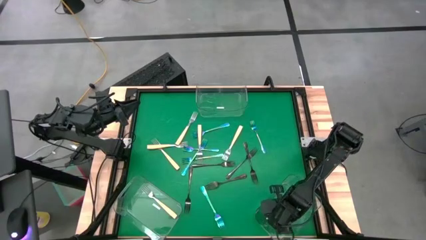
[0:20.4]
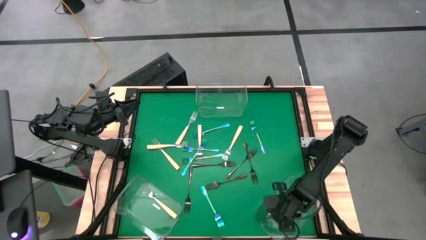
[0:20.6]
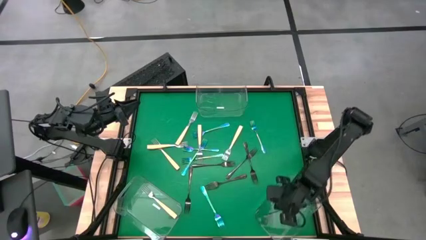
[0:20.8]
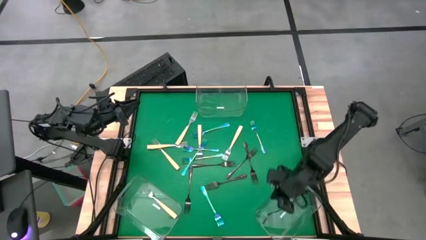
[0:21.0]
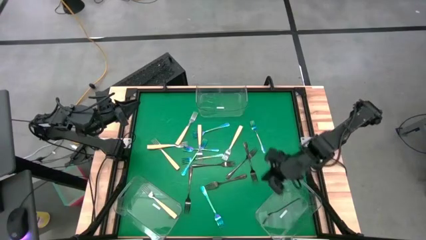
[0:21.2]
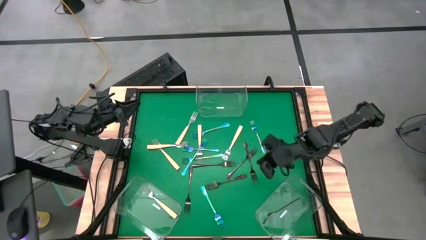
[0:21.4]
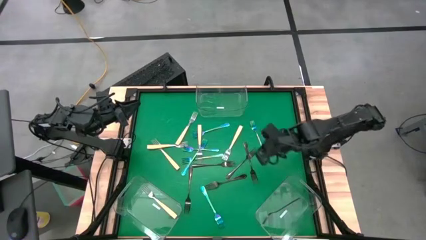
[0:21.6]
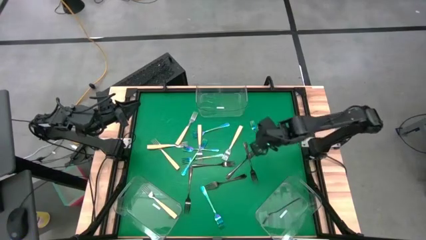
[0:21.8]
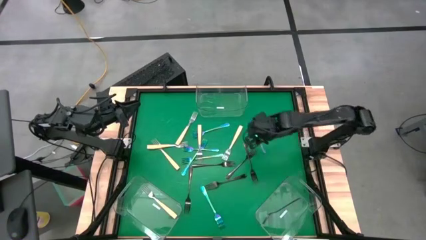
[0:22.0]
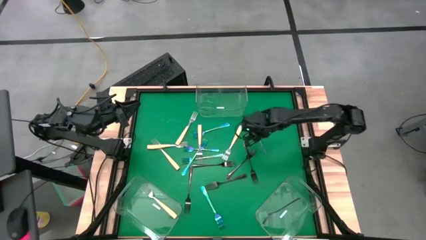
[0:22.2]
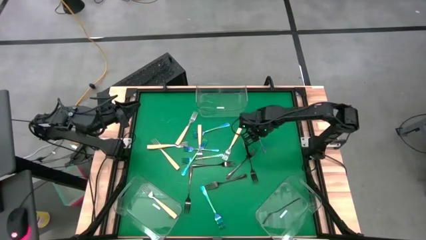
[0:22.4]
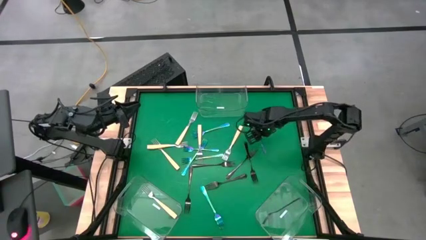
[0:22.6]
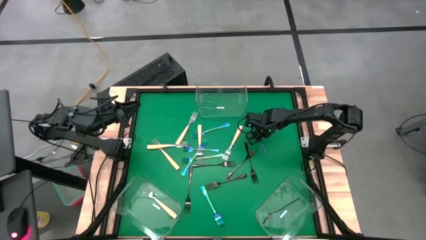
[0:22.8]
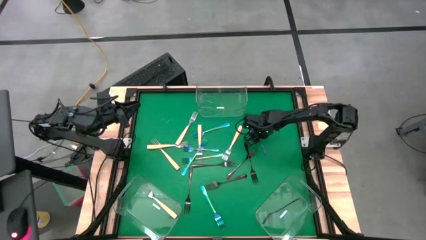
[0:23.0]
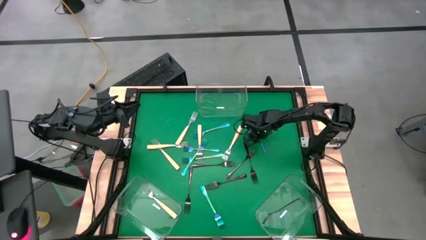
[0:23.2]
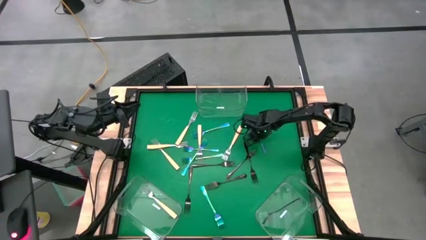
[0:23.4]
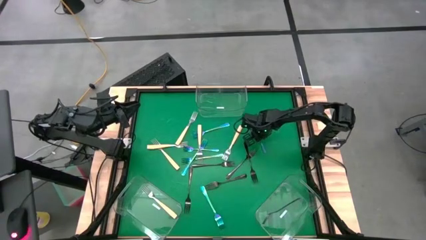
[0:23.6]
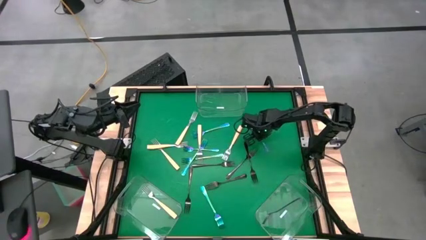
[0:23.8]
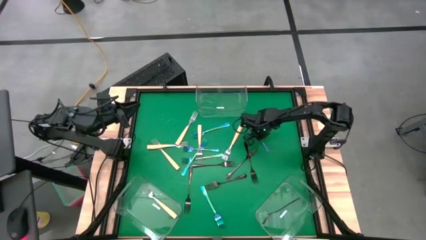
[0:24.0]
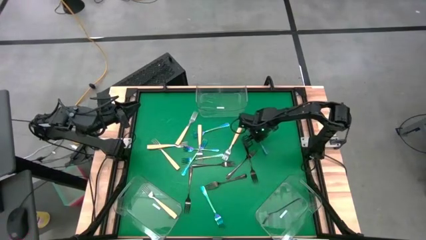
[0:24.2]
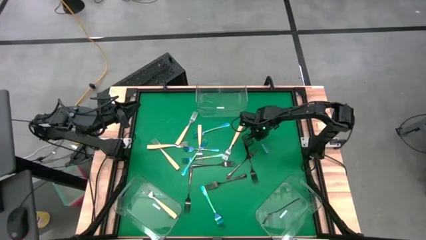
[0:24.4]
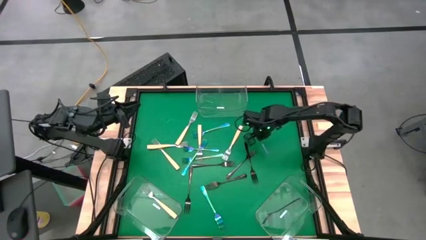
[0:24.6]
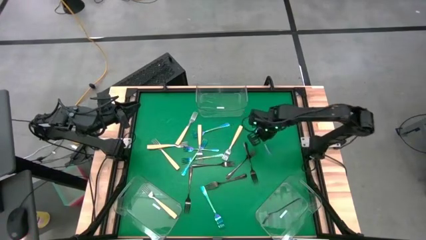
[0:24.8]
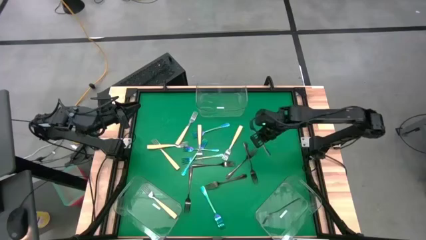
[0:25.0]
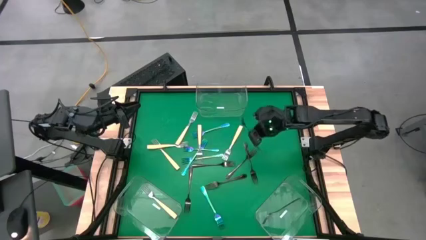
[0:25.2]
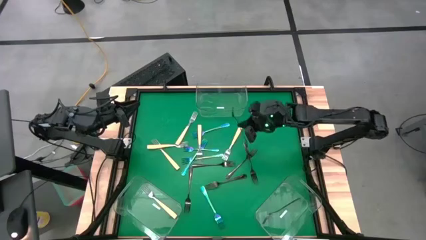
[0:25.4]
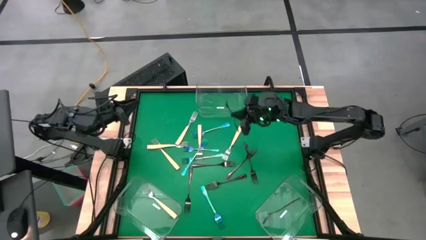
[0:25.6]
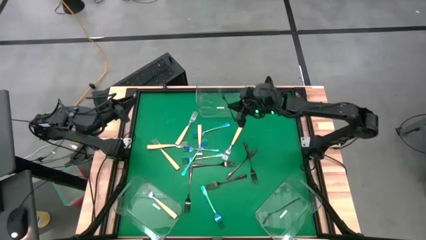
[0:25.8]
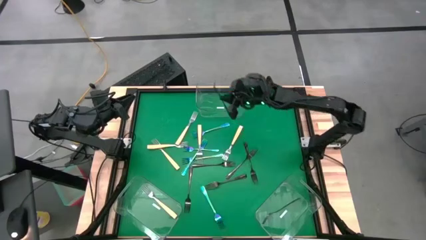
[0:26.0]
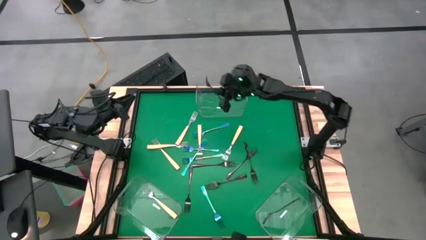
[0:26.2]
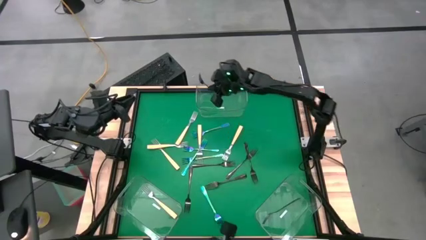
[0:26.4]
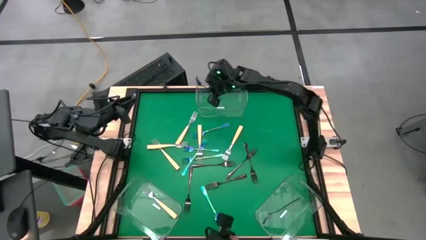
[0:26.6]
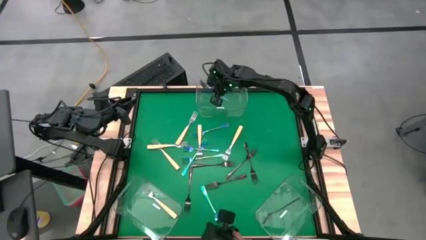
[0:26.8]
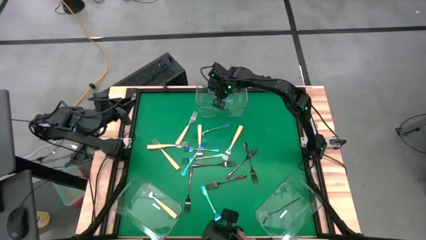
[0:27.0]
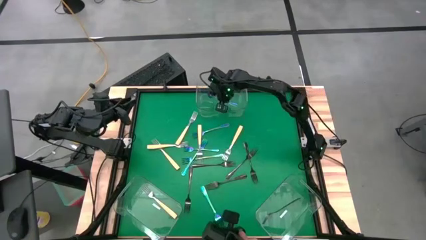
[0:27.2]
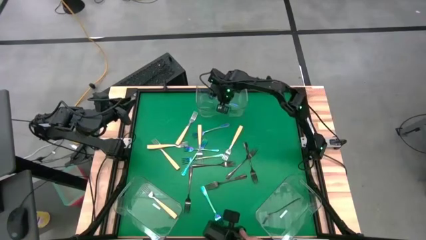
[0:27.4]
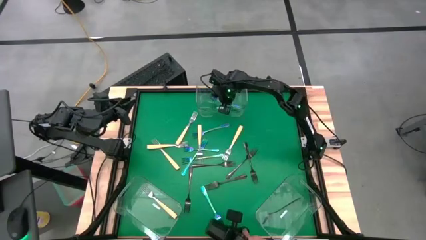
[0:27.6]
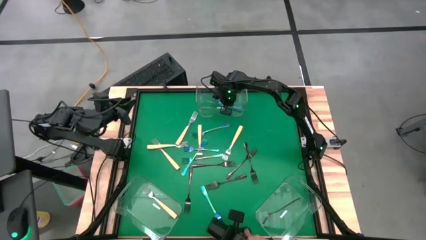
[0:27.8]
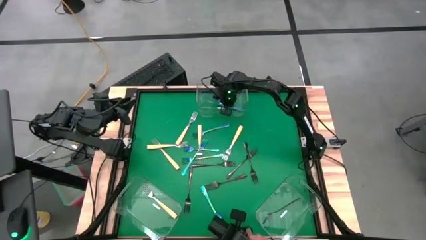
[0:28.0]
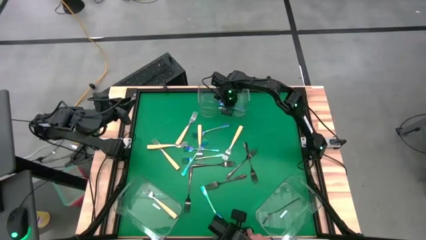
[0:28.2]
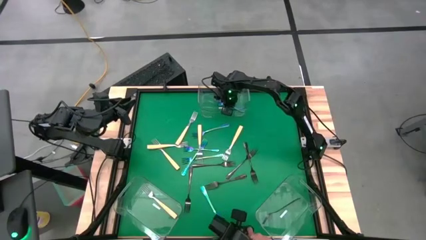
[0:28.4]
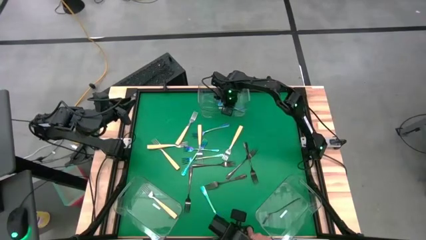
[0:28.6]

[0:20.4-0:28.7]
Task: Sort silverware by color (type)
Put the blue fork into the top transparent bin

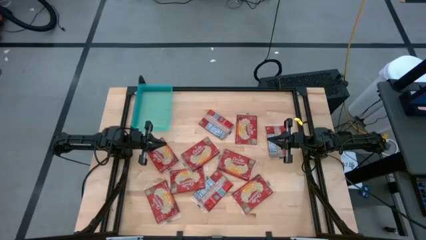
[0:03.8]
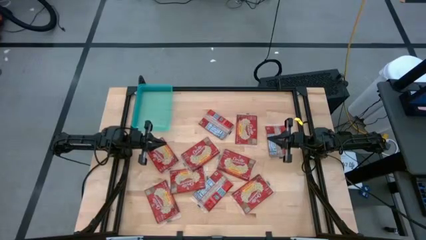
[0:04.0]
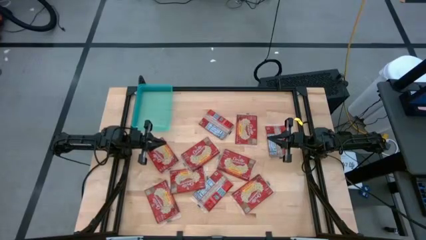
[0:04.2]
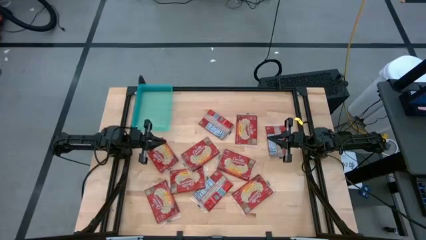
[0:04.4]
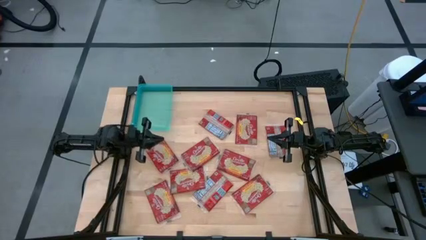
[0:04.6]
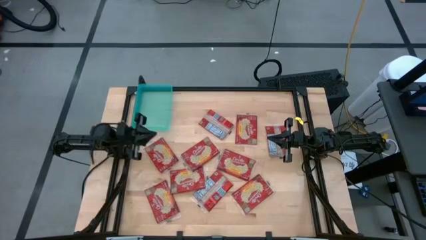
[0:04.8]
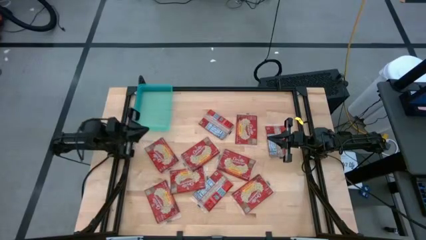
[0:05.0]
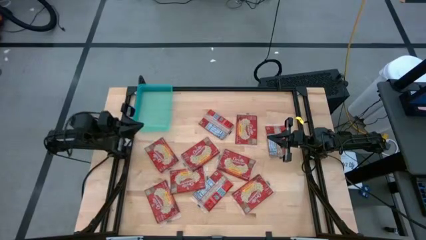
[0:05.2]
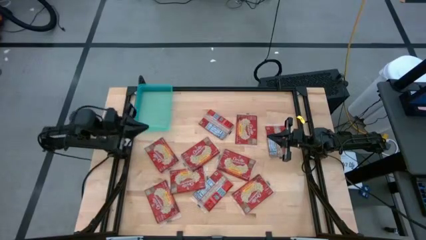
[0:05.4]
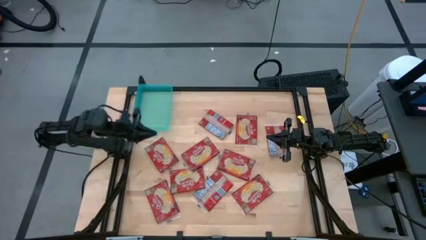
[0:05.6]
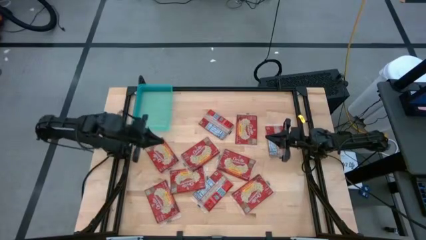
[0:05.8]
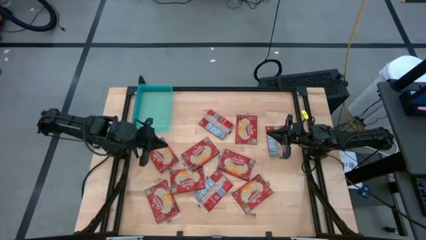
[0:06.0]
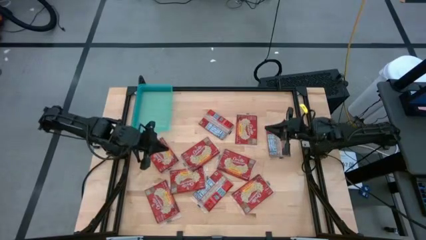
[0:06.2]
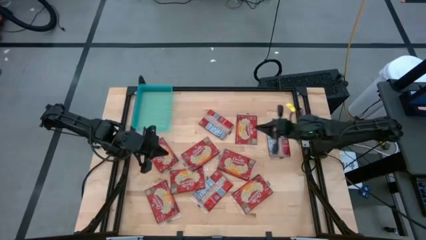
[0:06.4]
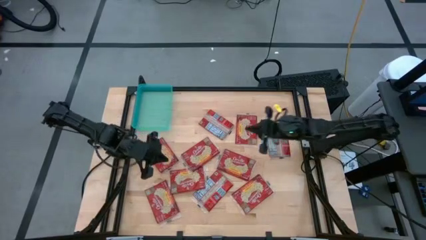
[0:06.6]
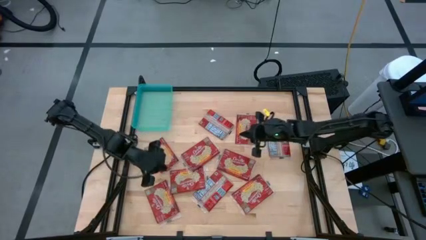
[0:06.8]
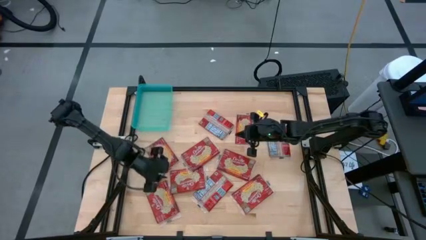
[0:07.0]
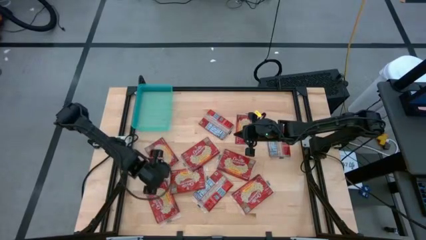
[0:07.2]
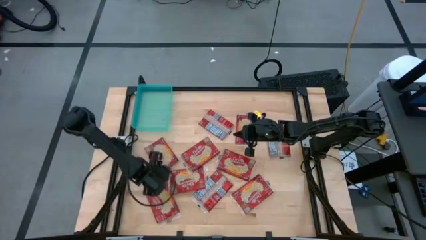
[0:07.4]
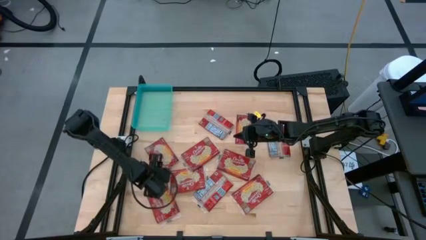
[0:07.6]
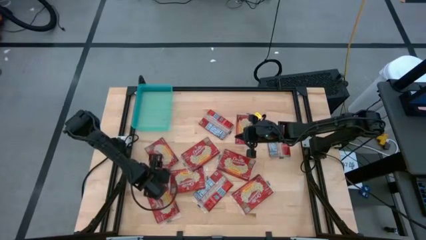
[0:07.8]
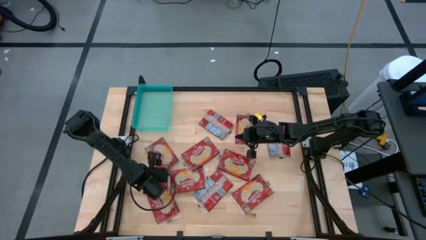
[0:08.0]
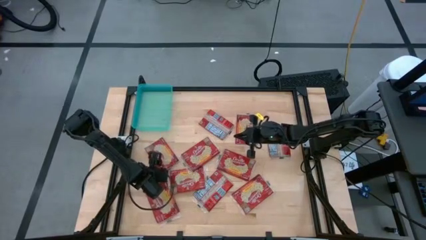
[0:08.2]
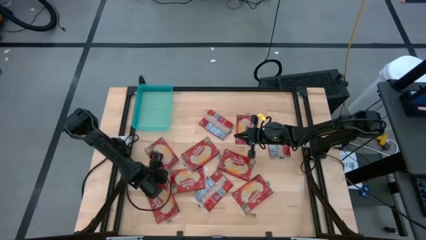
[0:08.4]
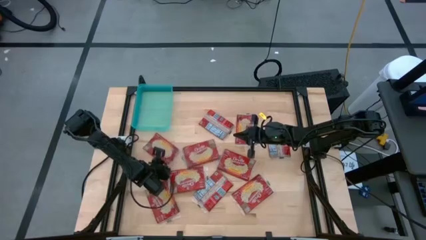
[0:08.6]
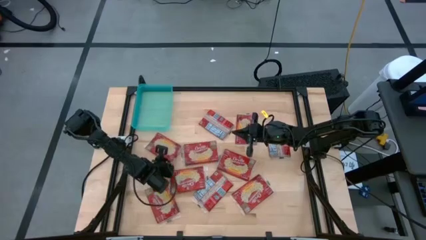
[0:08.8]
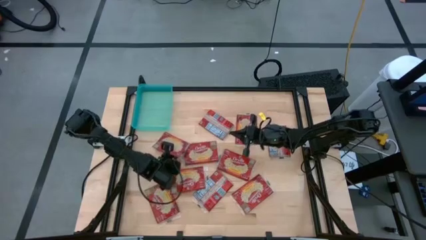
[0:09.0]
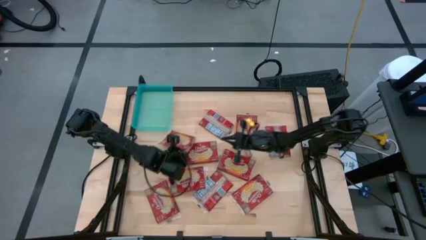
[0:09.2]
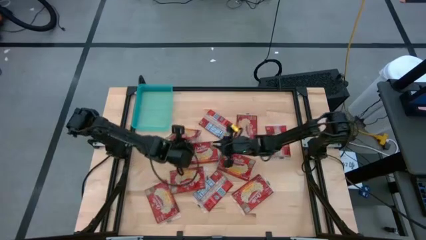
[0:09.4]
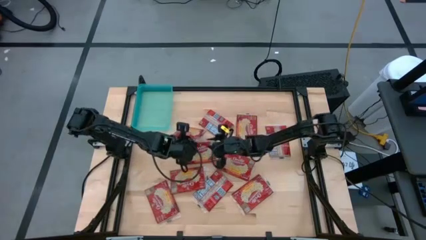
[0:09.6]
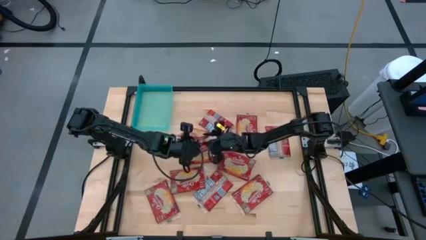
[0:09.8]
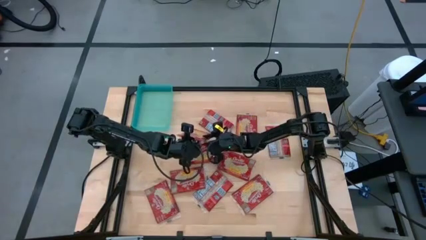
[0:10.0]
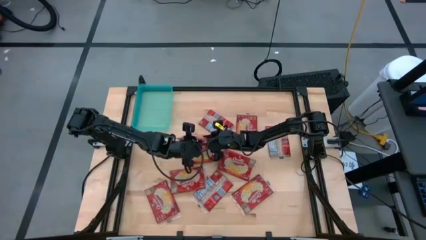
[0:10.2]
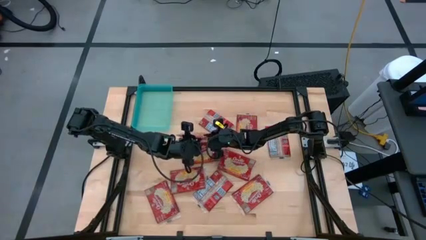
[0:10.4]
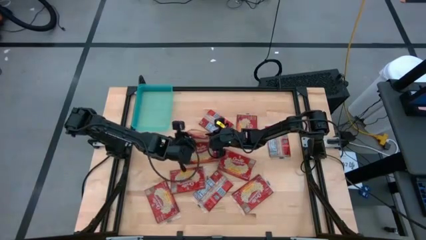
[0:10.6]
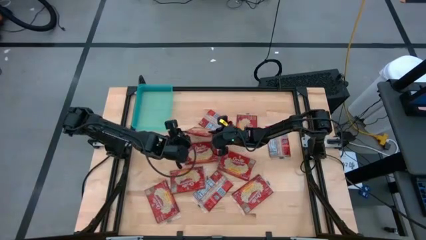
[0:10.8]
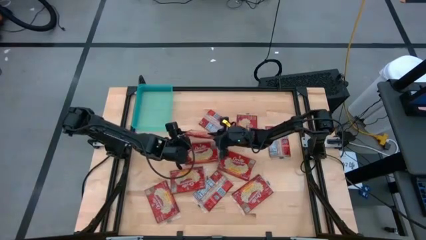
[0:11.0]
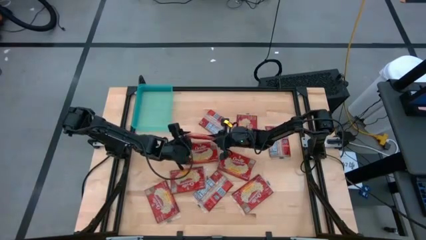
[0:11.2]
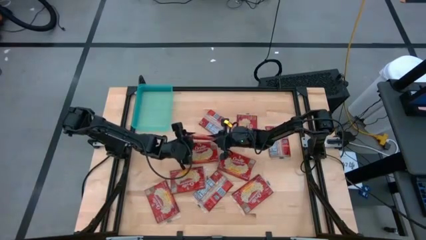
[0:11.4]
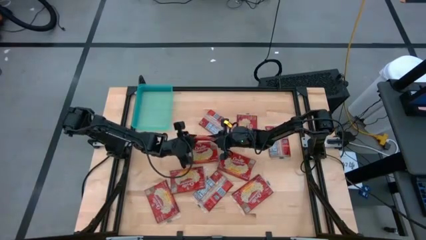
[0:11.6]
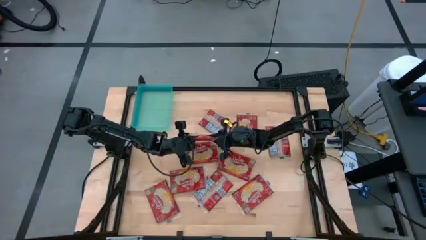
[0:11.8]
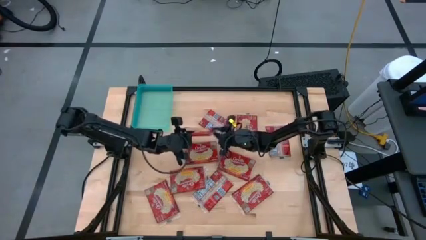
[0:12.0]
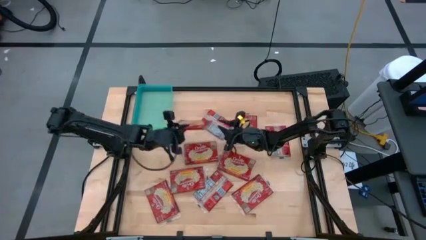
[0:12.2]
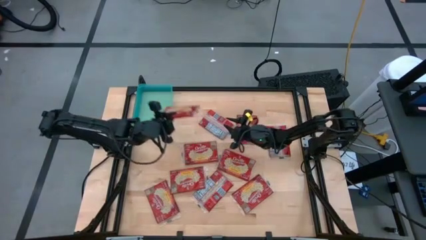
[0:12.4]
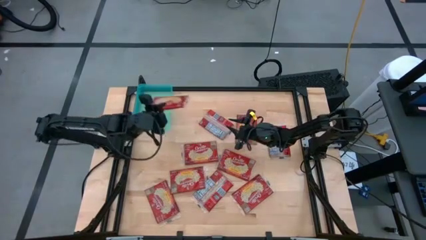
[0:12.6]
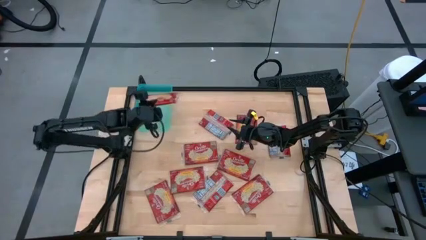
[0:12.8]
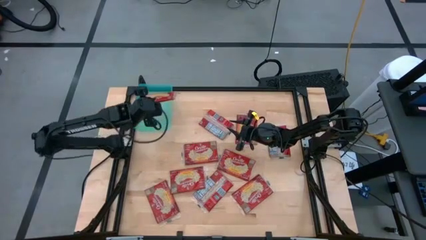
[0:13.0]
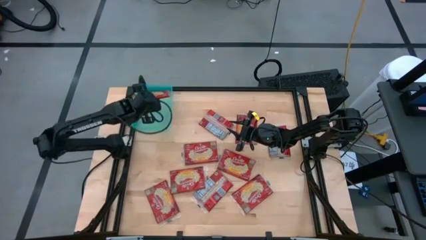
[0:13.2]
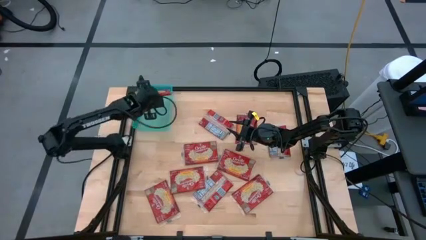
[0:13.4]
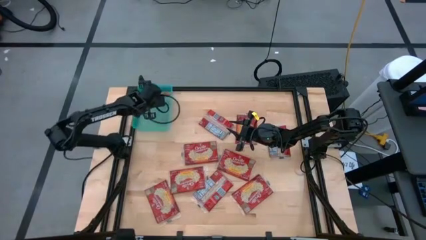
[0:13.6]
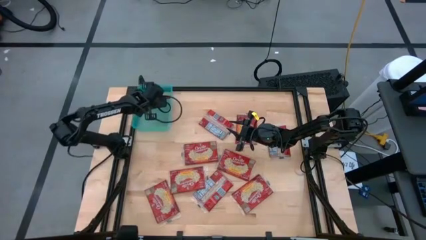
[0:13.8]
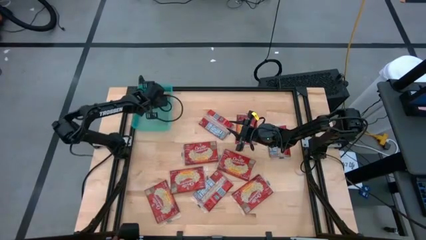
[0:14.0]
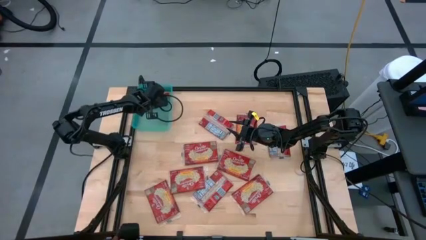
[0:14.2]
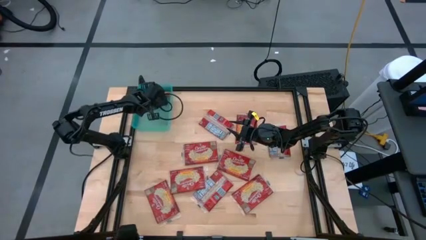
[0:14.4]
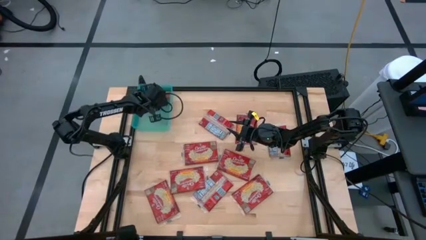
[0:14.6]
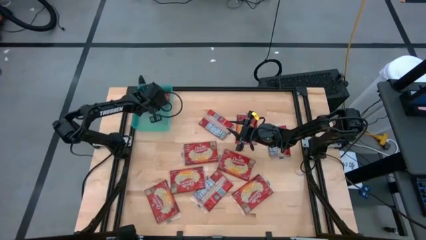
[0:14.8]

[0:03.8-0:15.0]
Task: Sort popcorn bags into baskets
Put the popcorn bag into the blue bin
